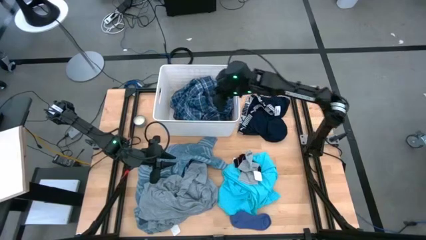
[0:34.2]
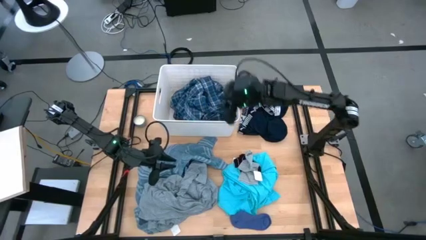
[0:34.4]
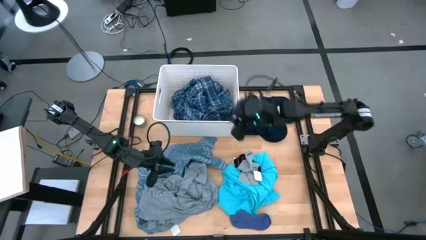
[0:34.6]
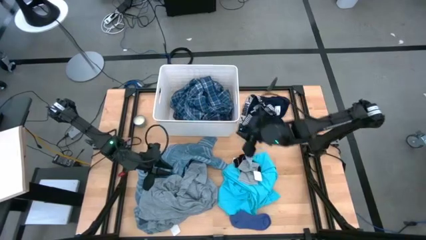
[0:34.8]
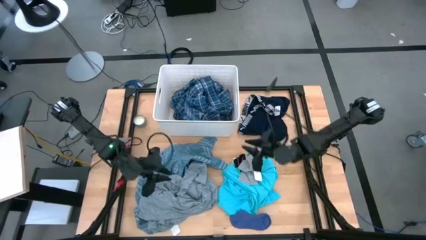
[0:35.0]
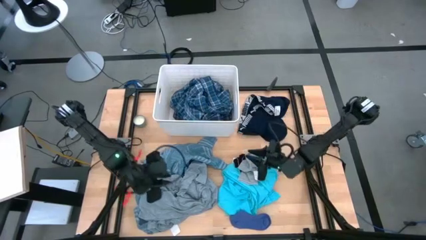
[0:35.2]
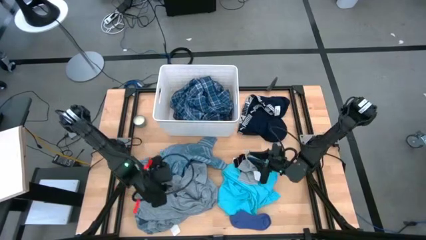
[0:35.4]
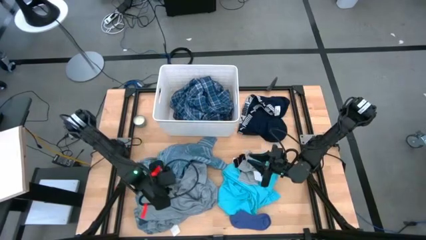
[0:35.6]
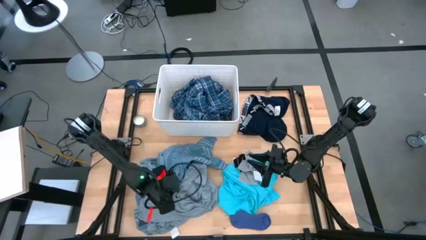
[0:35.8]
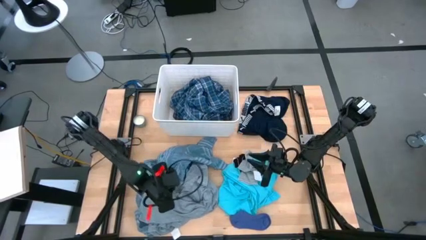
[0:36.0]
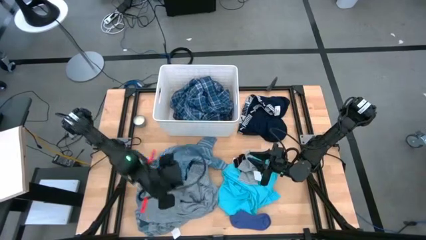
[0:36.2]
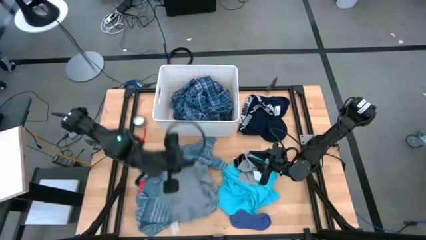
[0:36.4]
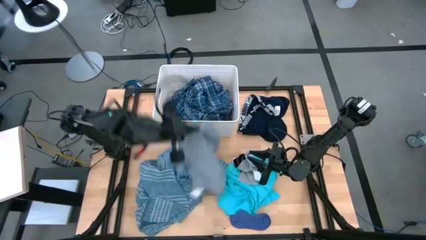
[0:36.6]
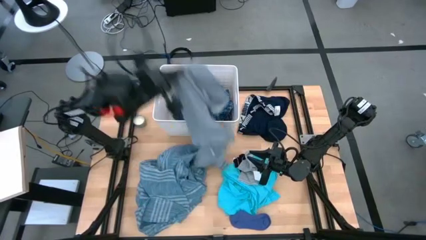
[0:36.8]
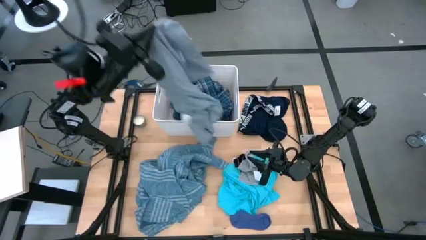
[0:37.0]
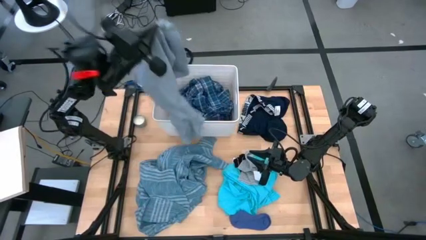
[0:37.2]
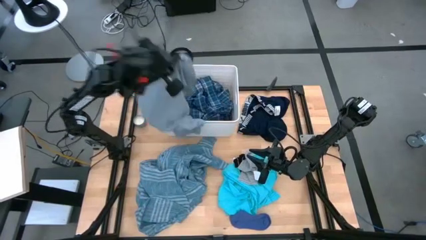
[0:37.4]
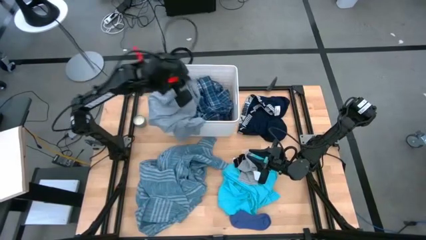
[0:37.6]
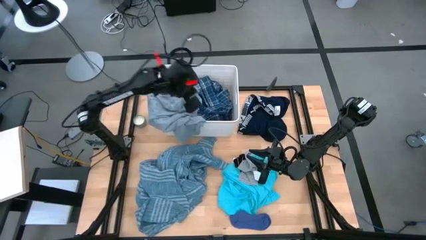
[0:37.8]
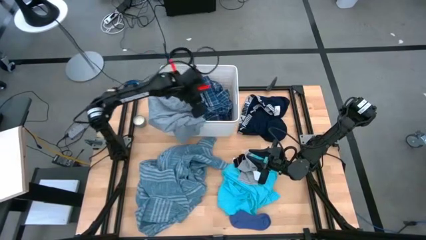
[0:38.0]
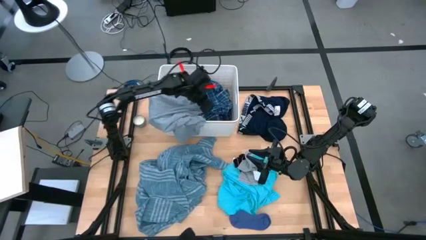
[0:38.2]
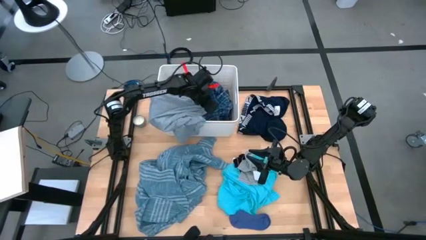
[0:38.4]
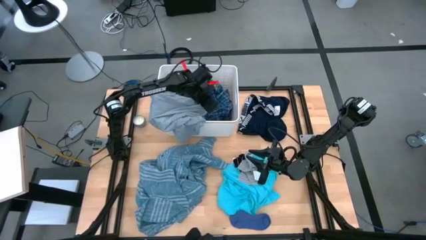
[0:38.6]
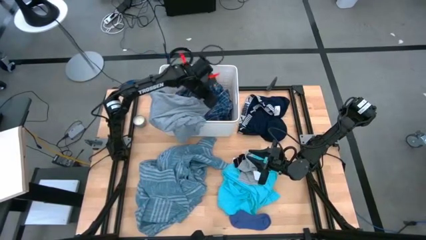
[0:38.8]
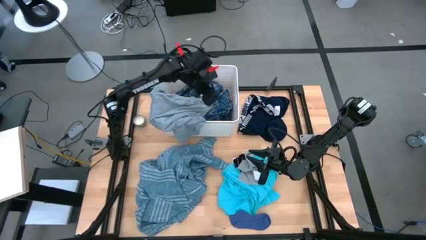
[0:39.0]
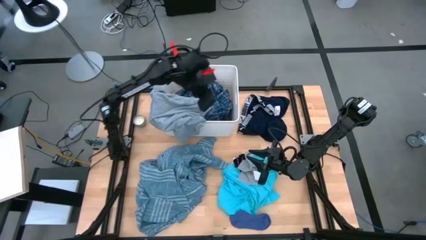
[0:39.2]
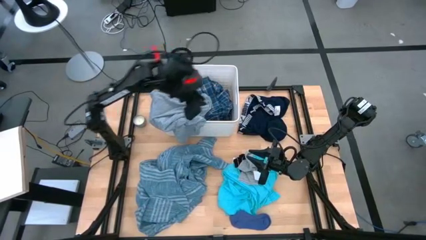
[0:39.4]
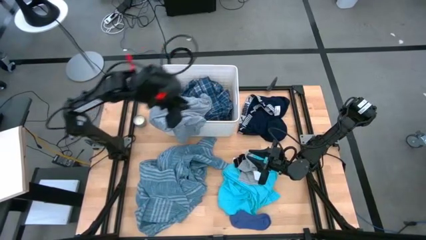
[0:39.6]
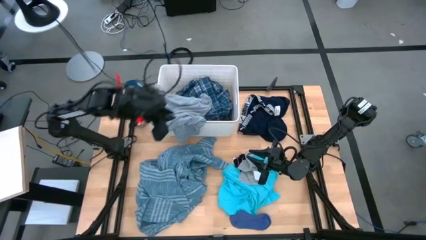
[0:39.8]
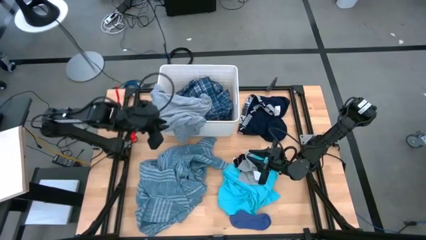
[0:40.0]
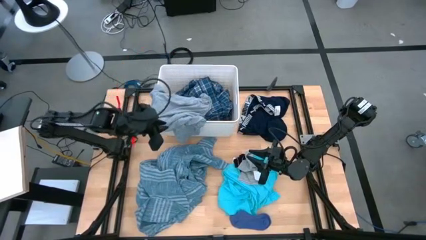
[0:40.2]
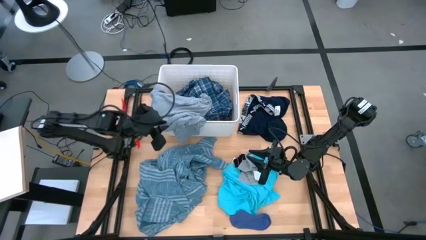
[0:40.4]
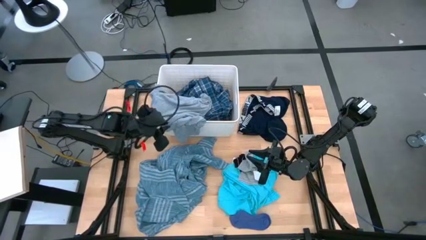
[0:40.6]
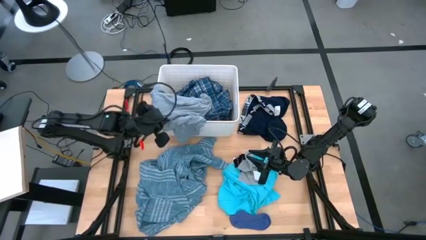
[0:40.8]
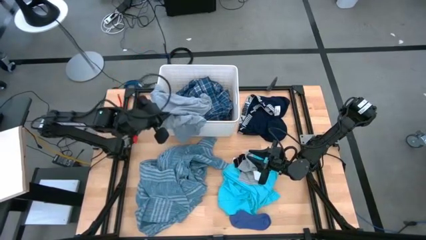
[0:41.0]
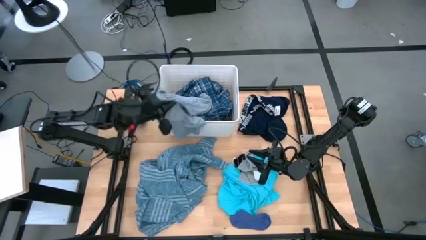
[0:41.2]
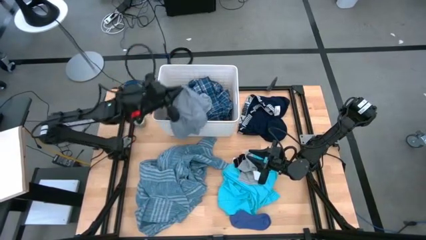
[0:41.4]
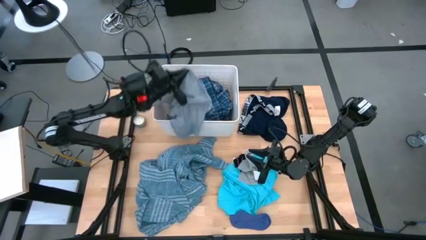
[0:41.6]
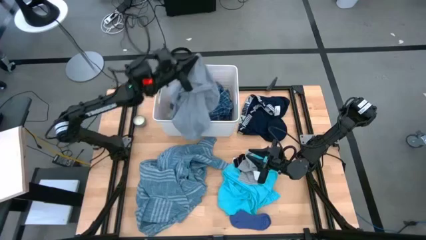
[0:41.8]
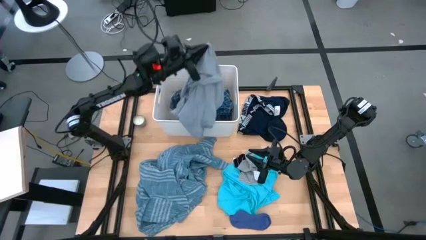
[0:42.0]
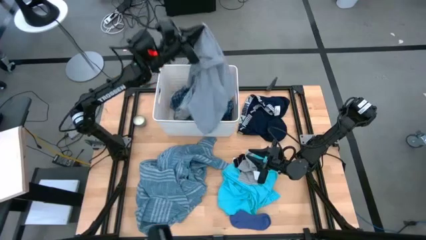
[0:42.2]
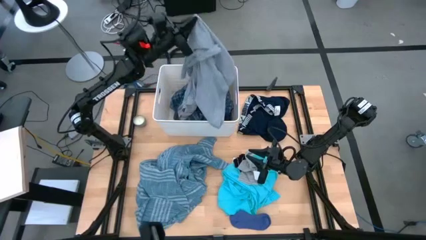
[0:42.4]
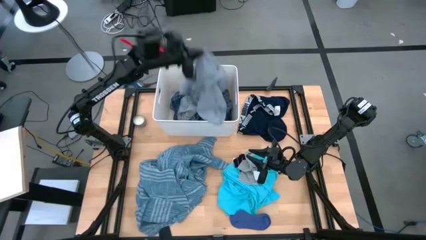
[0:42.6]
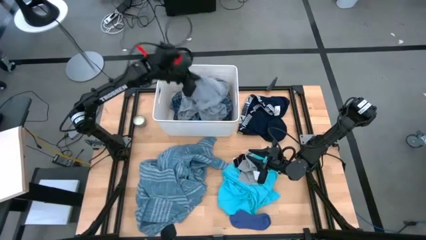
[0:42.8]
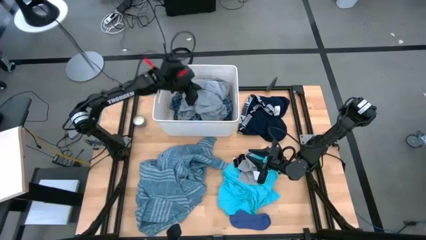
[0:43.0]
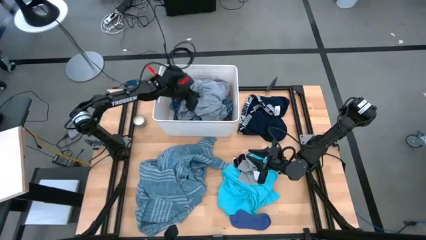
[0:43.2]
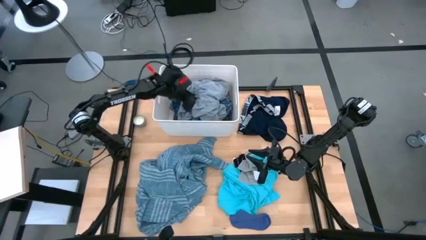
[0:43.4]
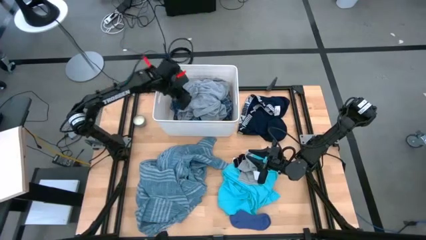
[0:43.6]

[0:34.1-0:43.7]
Task: Sort clothes
Put the gray shirt into the white laundry bin

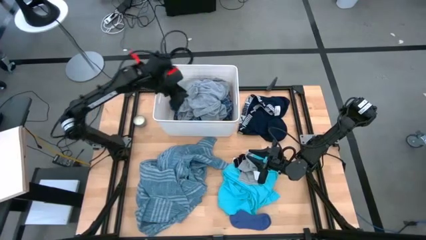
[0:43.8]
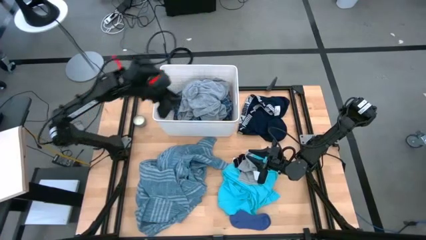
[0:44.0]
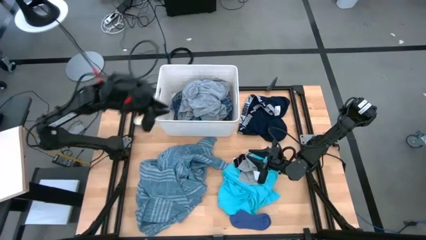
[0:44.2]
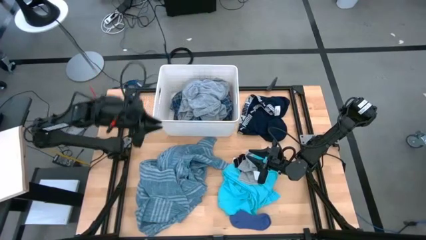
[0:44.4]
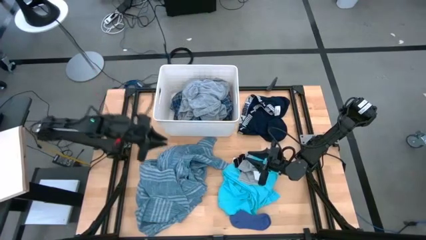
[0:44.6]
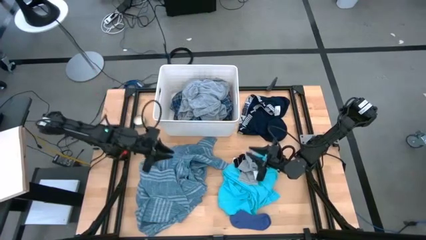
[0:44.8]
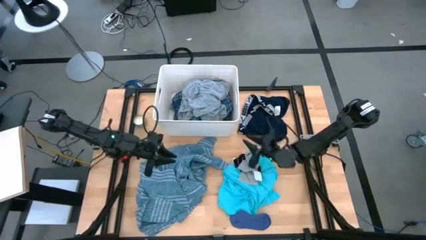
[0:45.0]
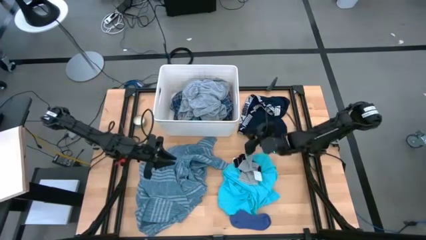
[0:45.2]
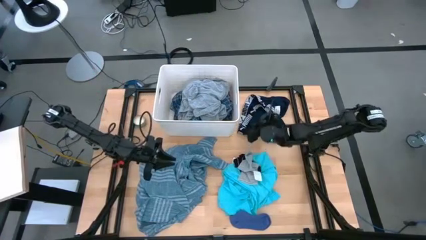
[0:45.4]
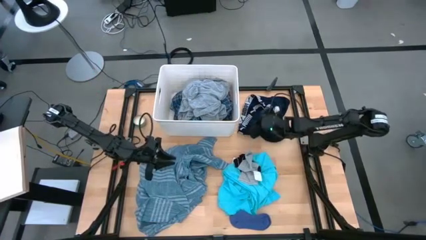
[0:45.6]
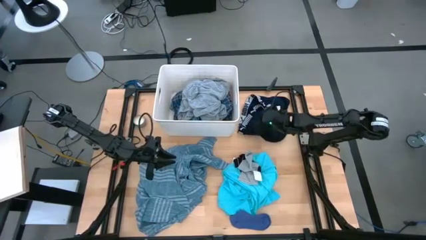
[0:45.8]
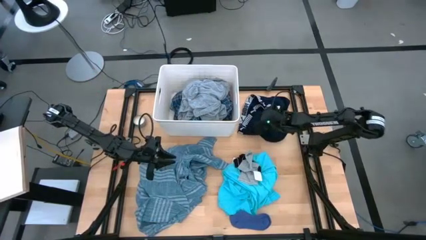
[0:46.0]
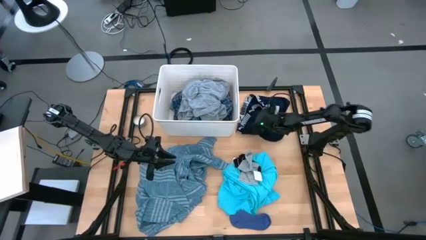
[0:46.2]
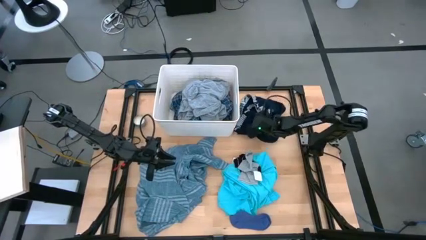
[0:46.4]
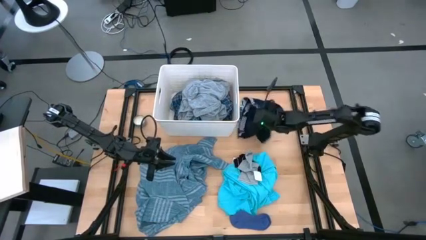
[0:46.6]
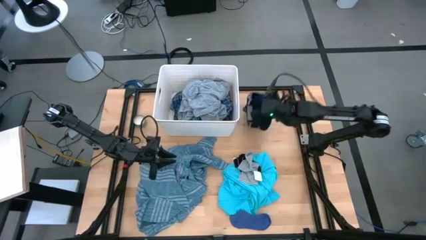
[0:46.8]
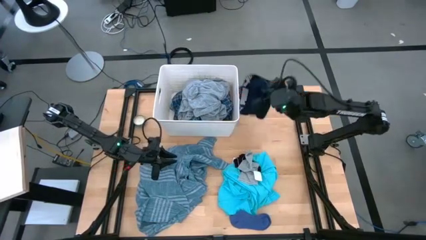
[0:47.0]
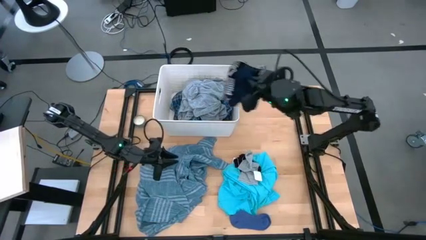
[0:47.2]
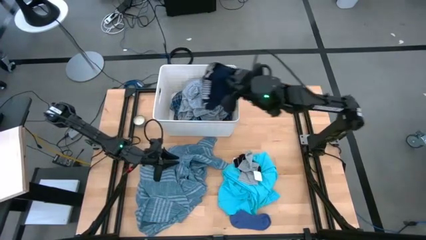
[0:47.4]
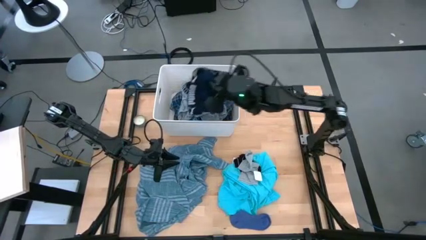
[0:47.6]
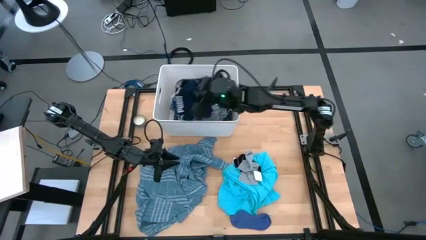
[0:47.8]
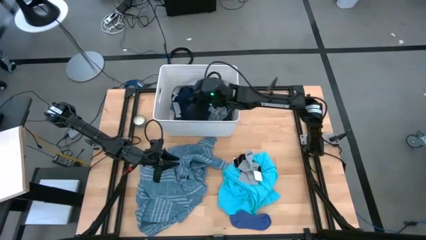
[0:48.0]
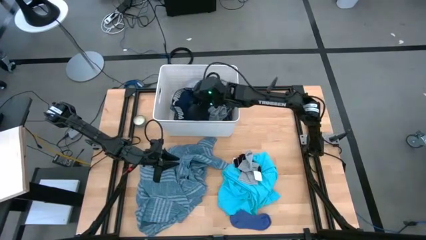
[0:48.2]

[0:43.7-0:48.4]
Put the dark blue underwear into the white laundry bin

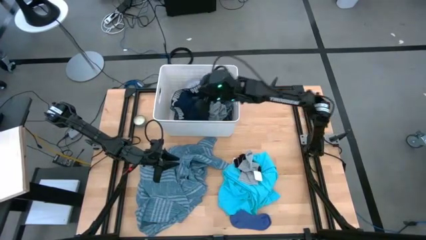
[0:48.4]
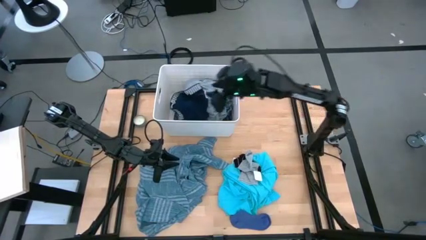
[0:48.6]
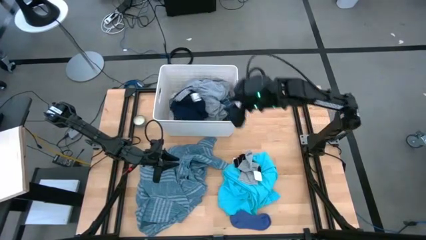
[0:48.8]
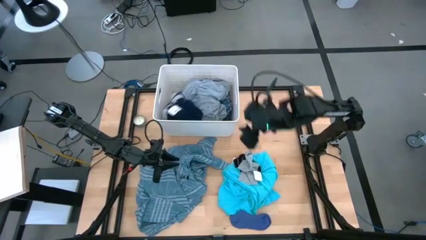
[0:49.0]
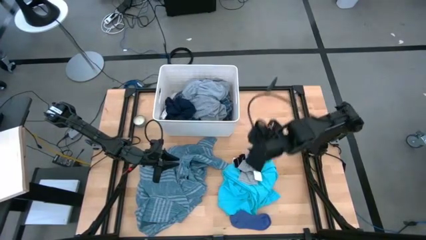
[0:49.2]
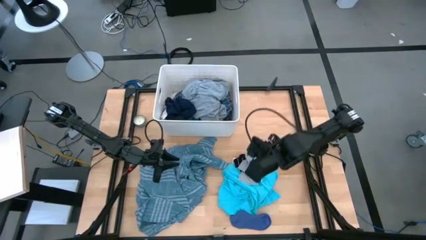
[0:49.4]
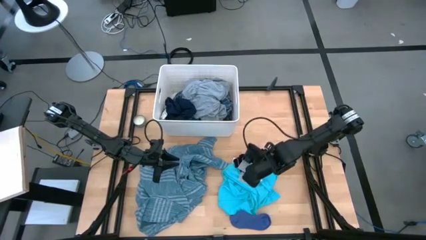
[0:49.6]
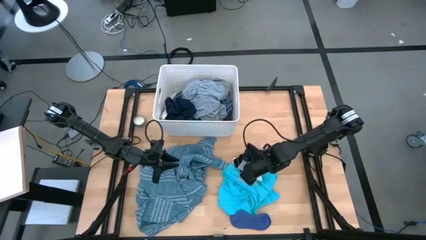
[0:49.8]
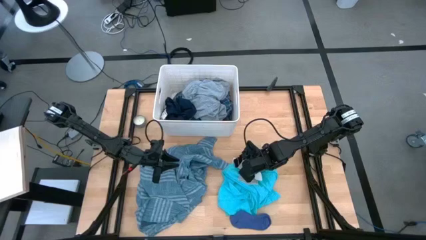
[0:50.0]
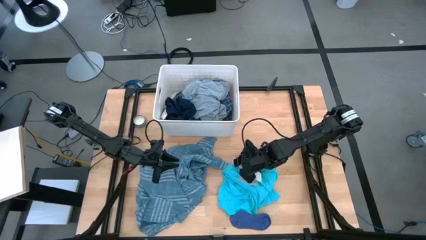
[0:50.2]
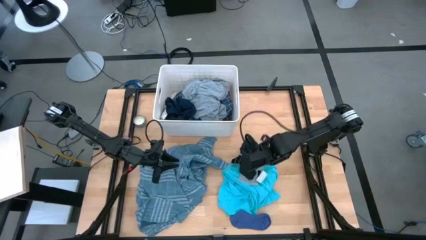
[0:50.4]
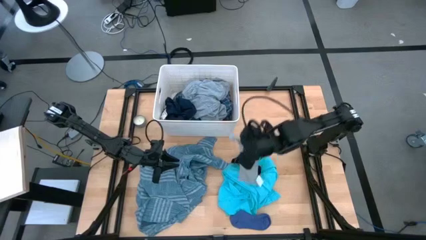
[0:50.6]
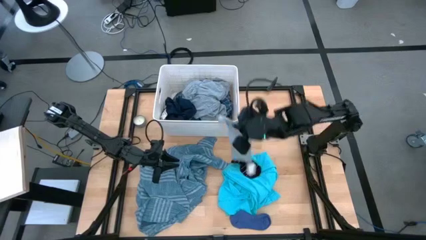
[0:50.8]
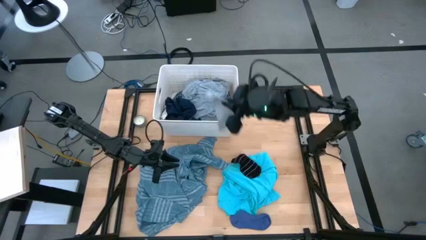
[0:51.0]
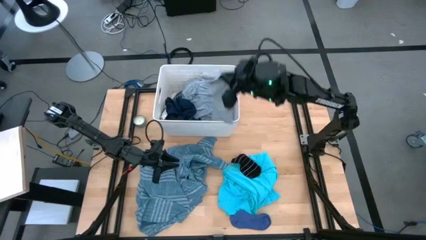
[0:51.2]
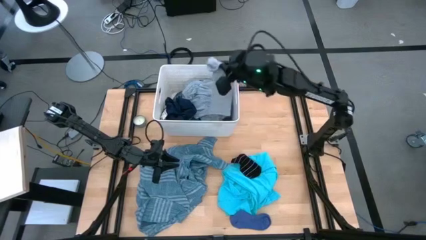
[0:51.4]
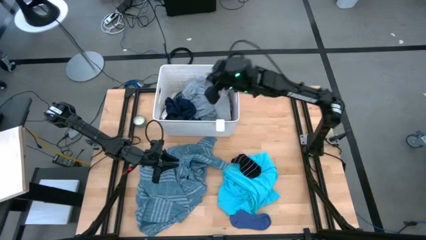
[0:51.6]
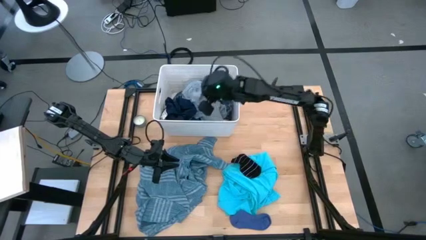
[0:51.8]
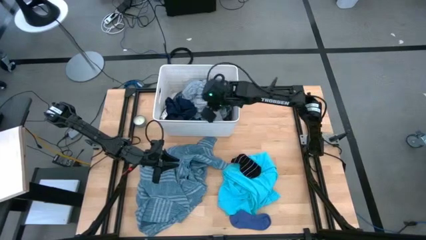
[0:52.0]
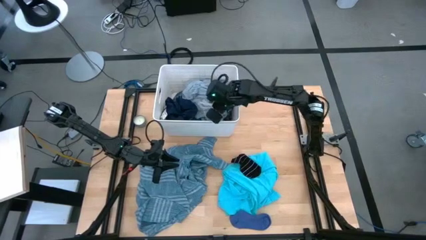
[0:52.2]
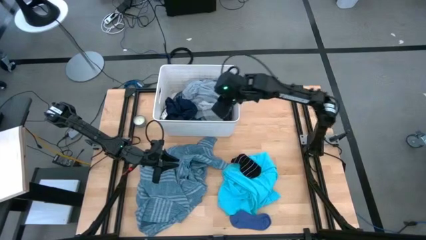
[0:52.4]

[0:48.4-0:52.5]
Put the gray sock into the white laundry bin
